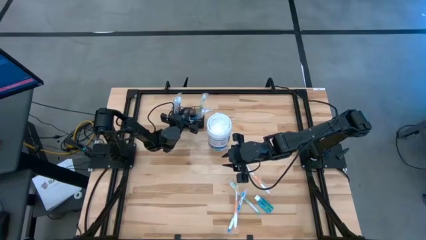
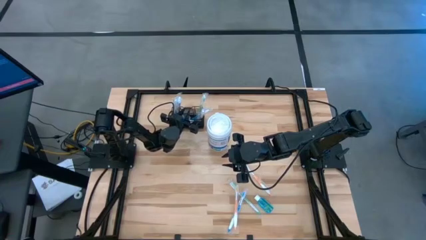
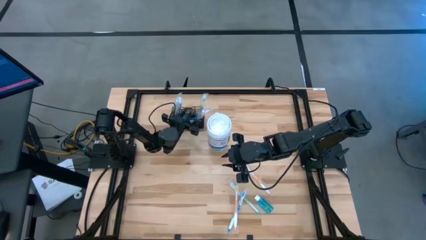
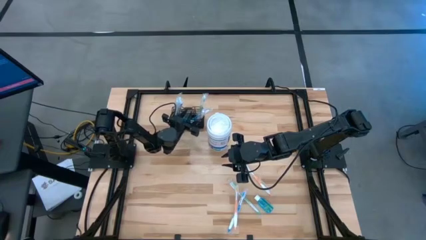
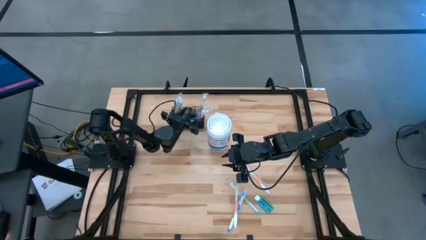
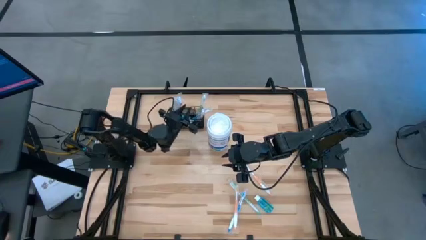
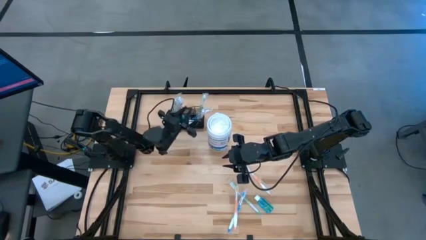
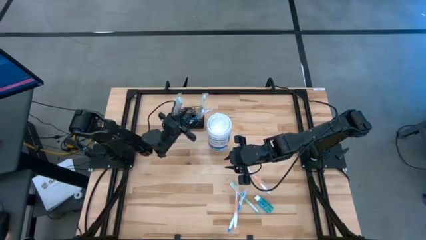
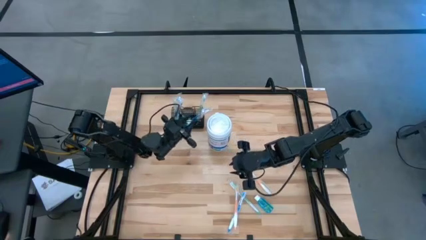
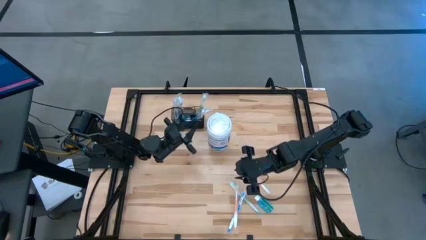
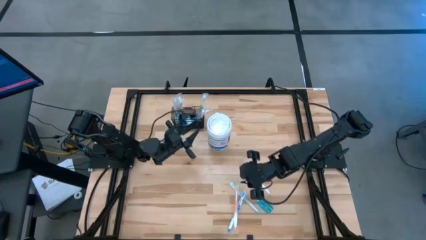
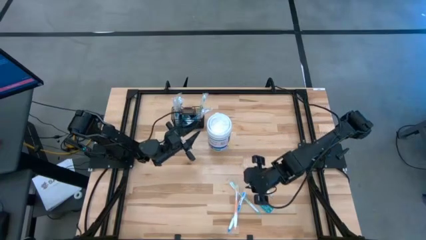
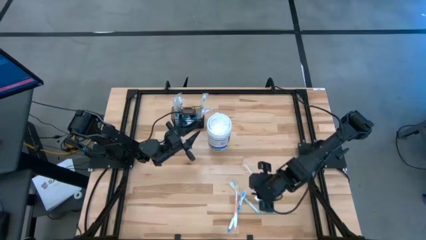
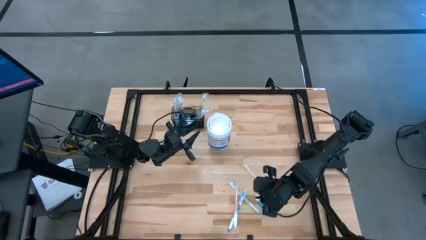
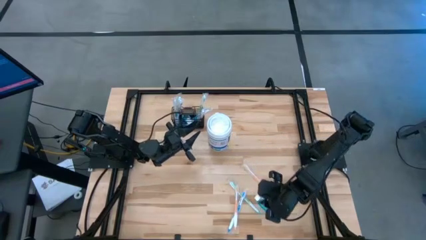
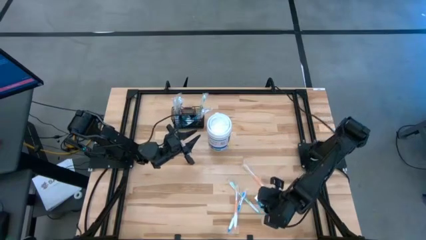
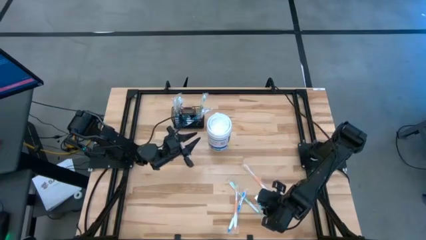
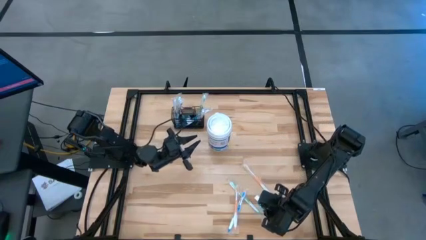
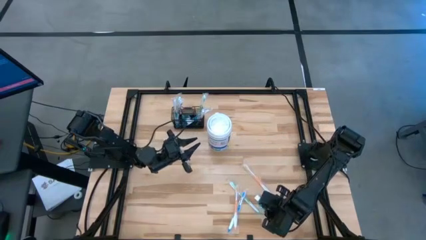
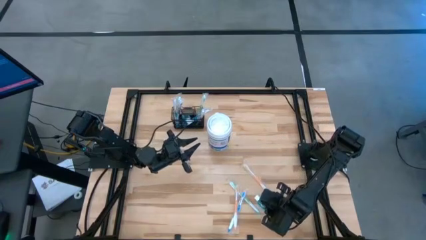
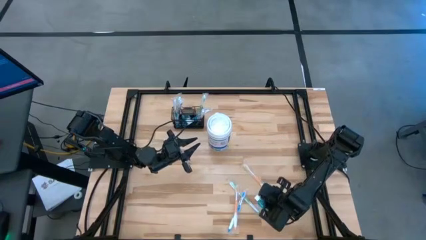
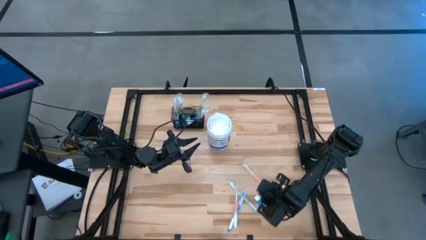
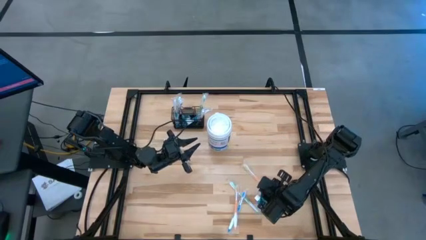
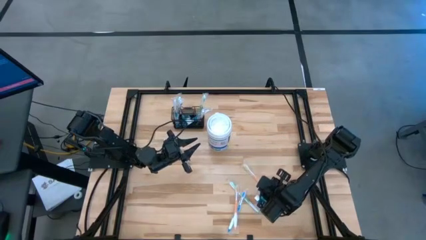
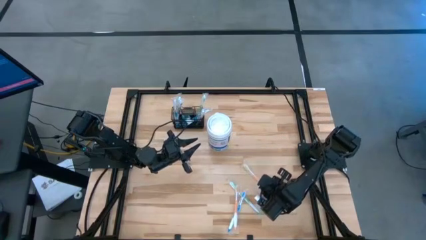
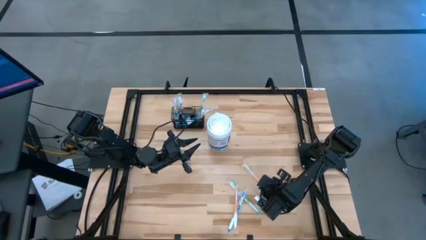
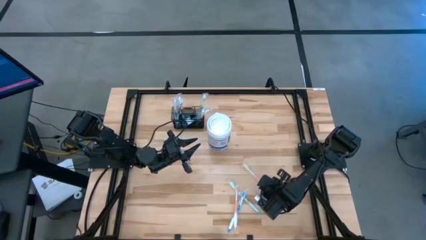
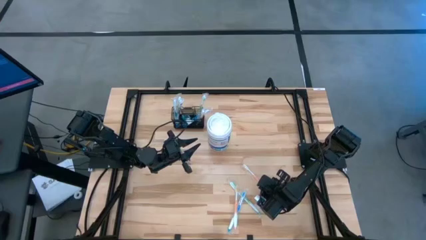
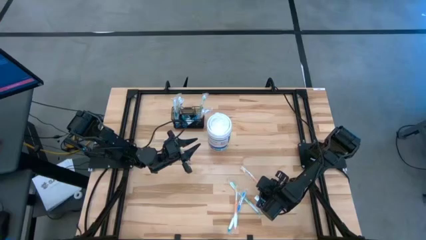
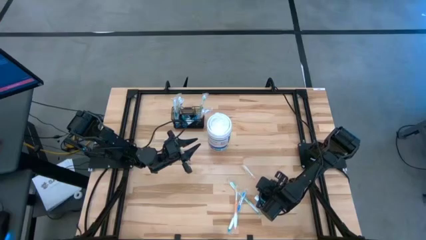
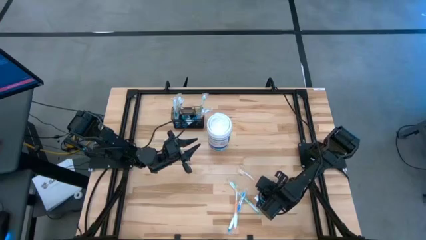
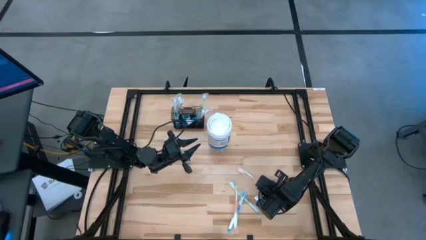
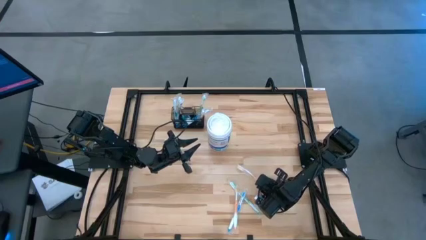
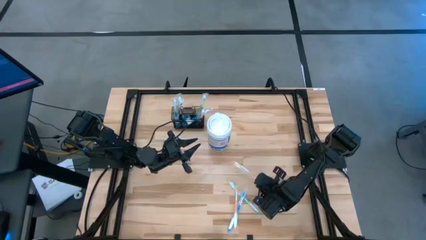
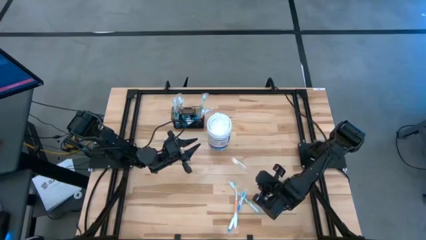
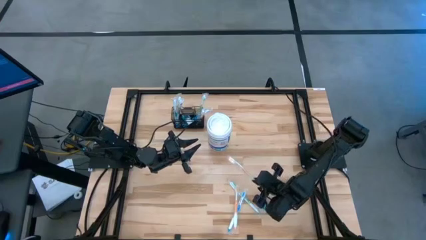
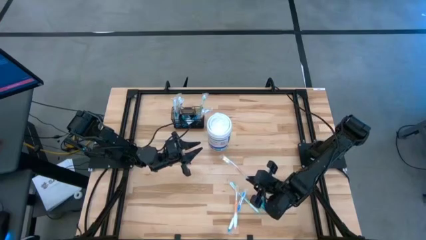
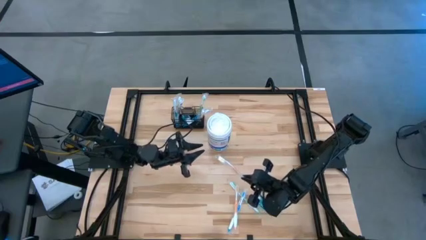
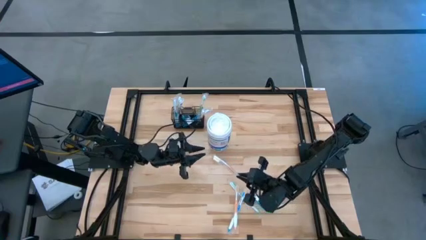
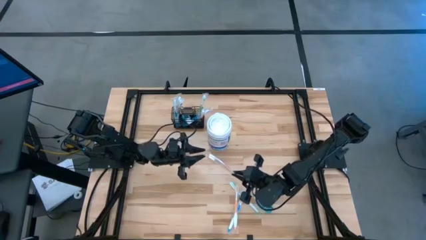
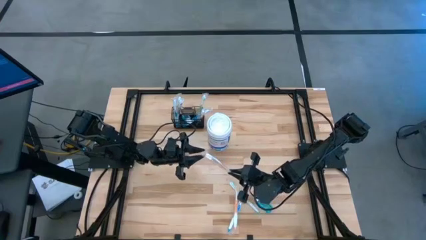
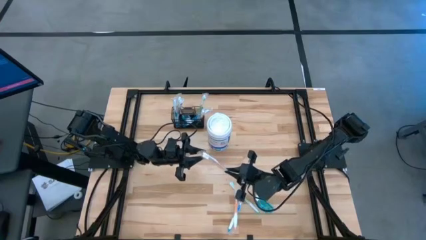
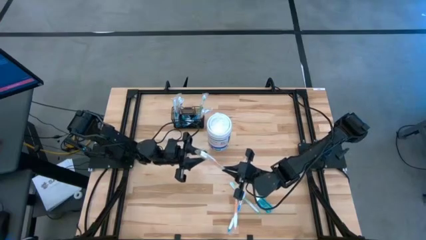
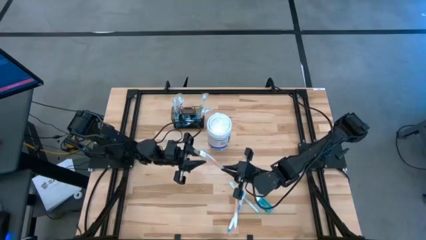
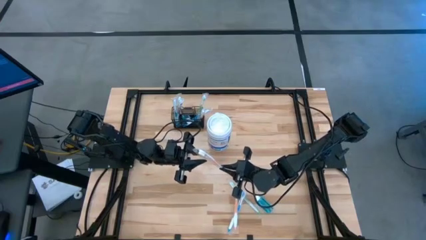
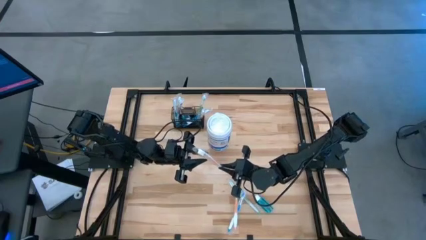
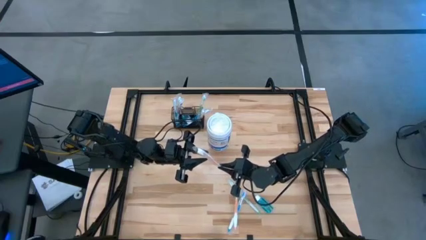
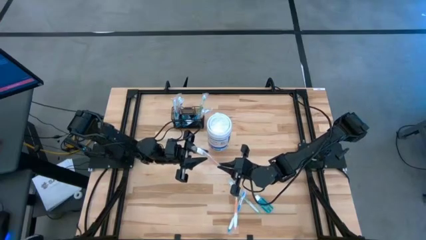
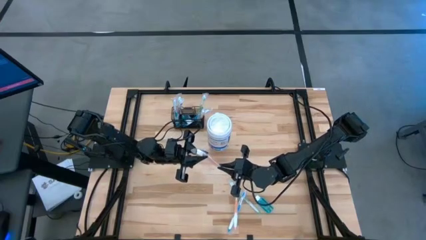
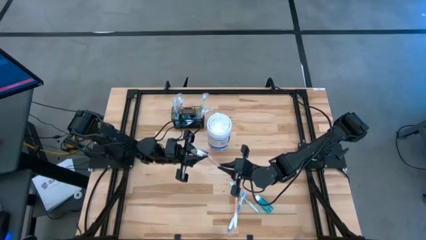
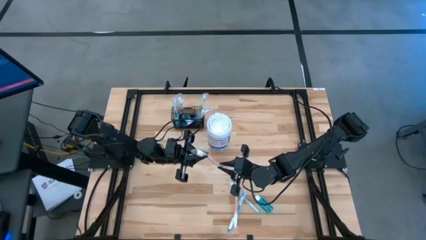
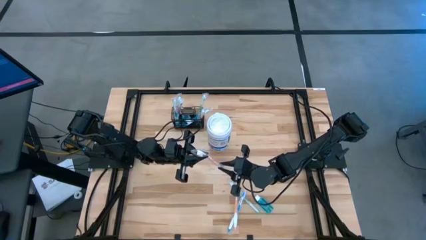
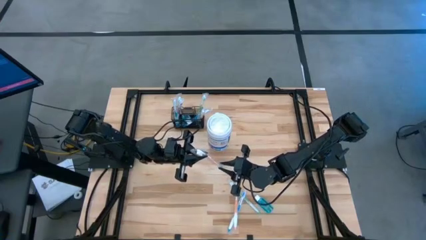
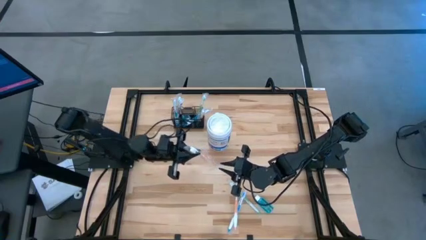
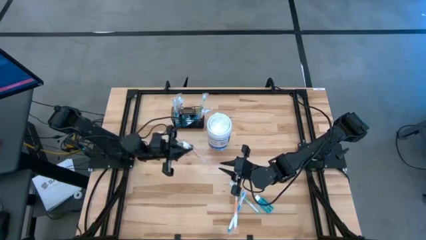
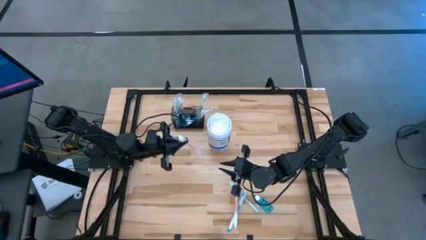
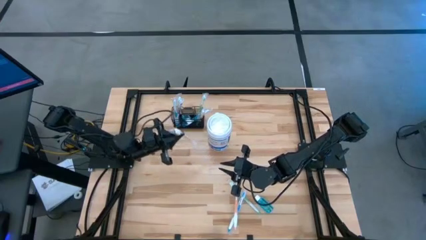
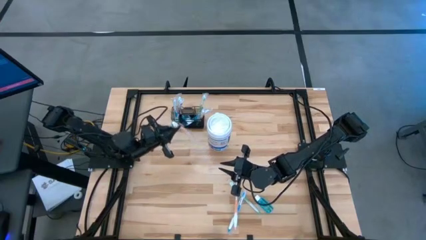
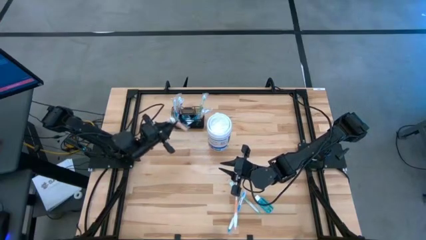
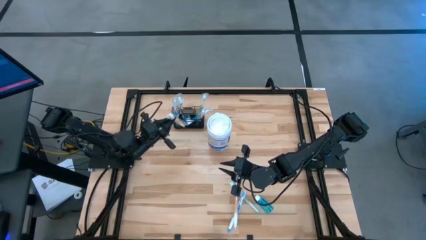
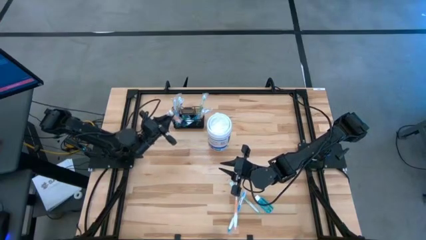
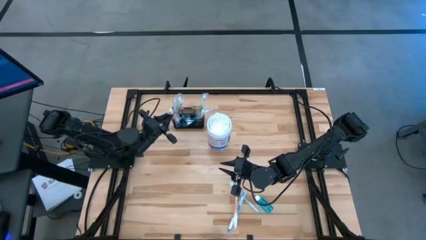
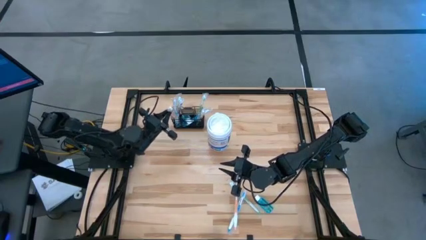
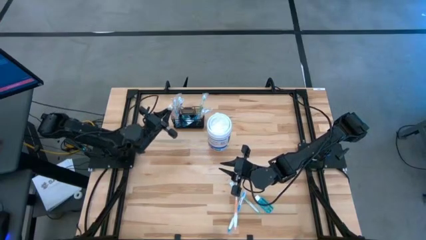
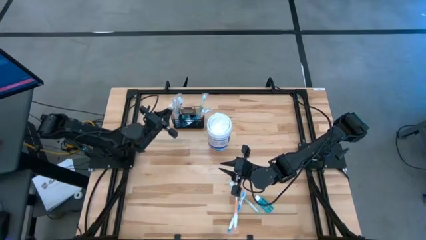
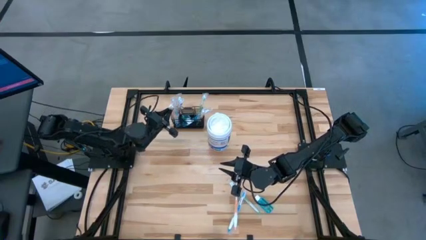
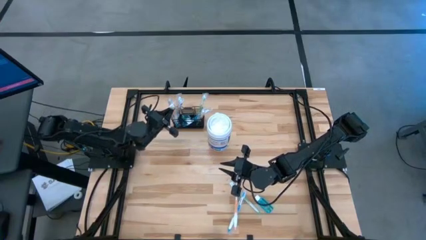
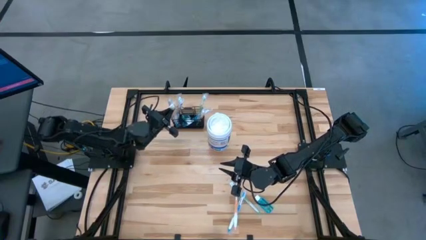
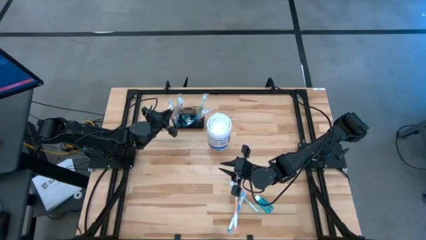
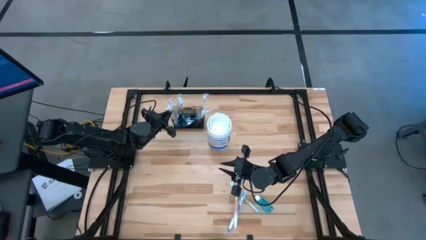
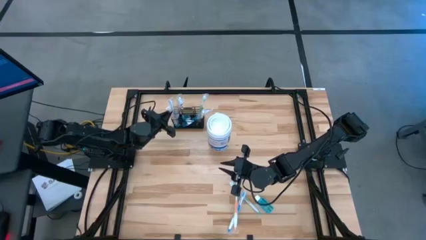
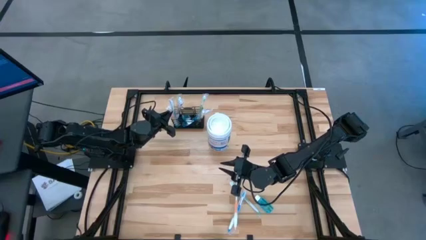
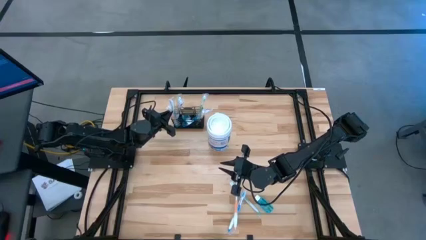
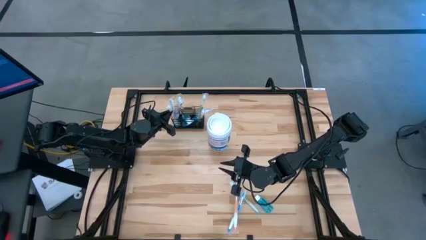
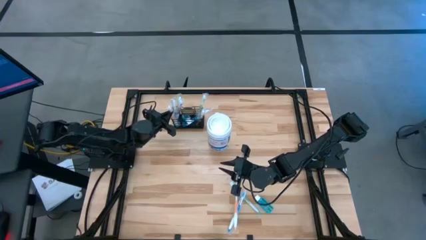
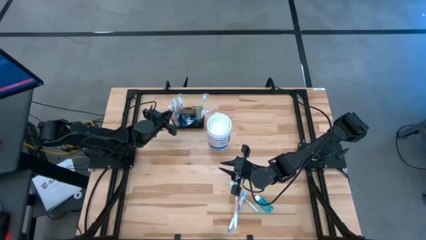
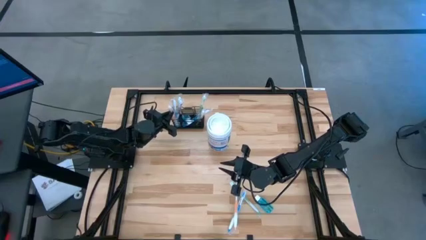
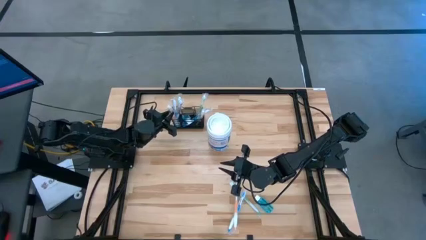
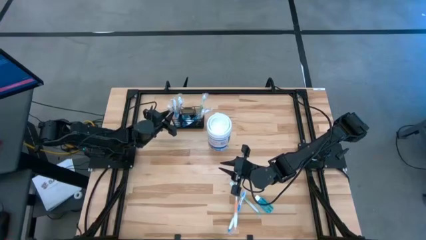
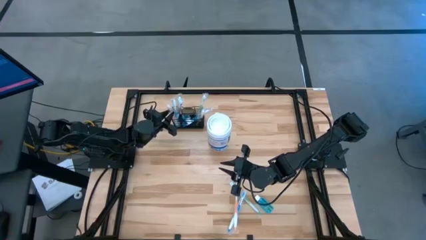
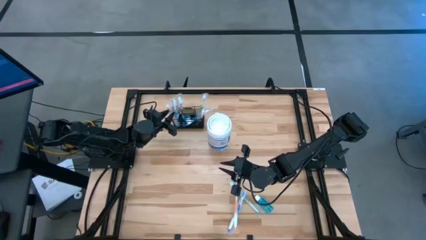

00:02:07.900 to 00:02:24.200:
Task: Pick & Place toothbrushing station
Put the top orange toothbrush into the mesh organizer

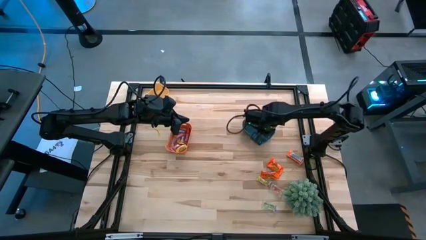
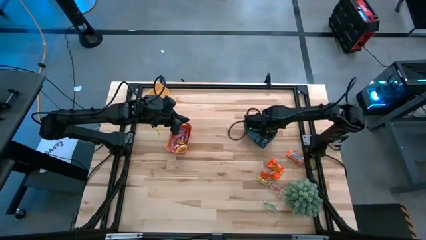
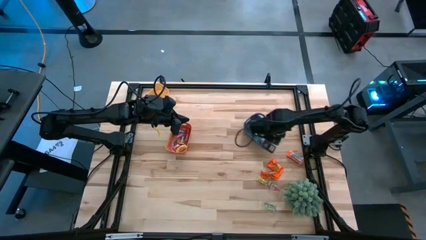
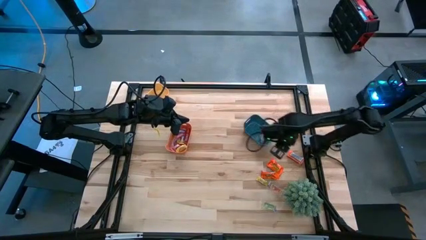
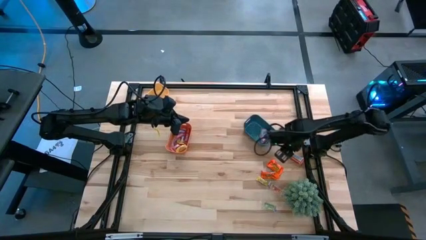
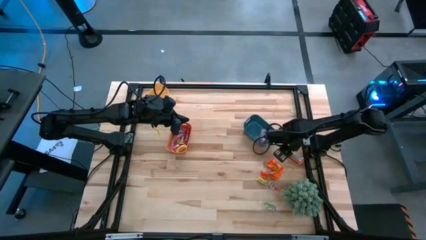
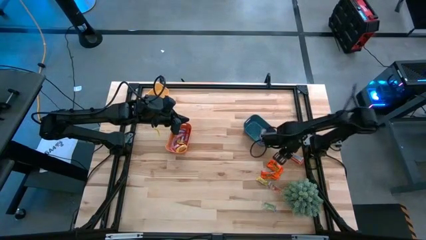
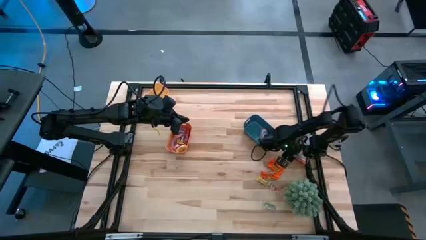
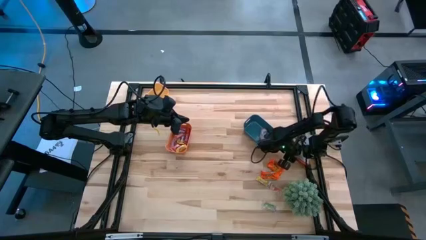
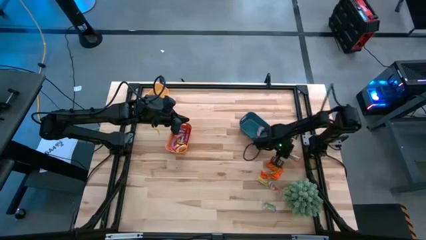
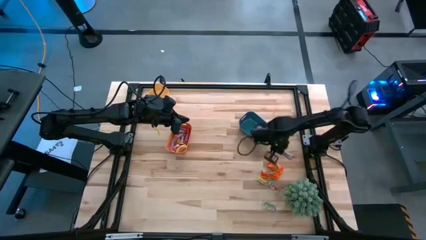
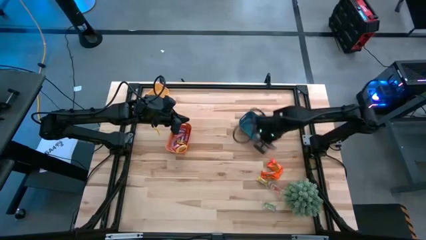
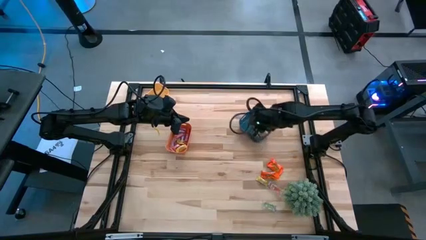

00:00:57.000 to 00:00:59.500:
Task: Sort candy
Put the top right orange chocolate into the blue bin
